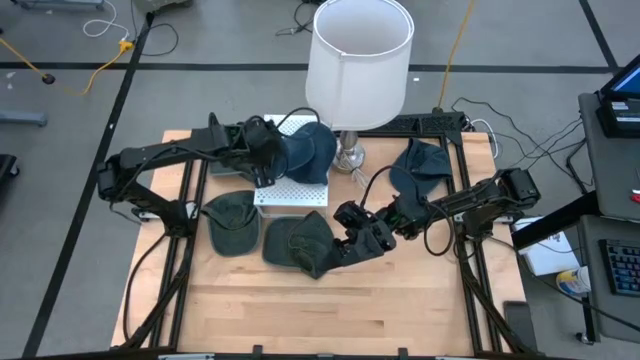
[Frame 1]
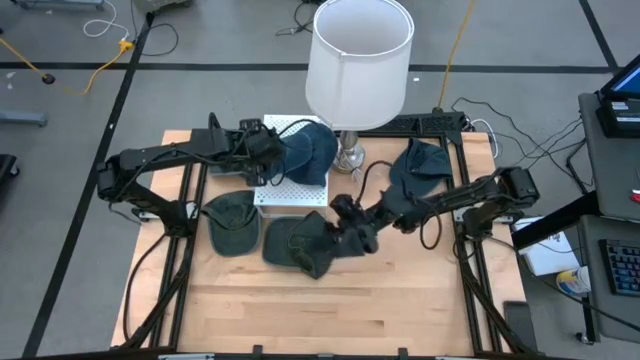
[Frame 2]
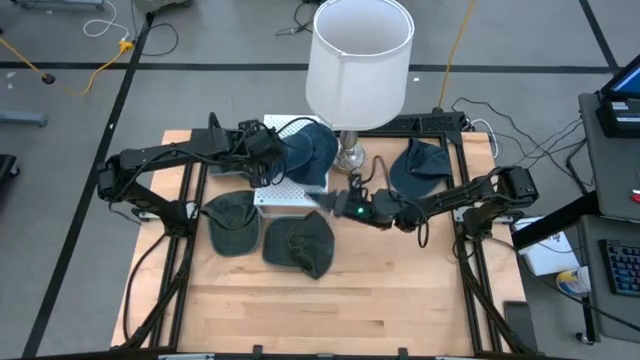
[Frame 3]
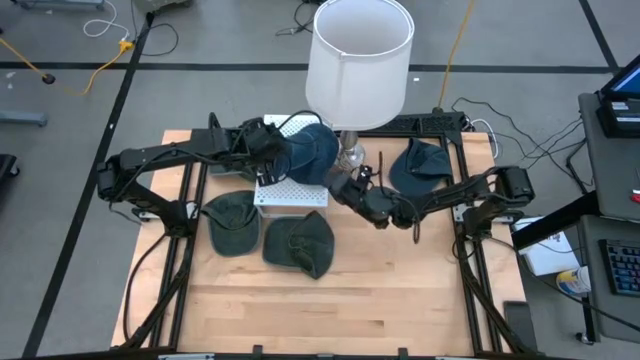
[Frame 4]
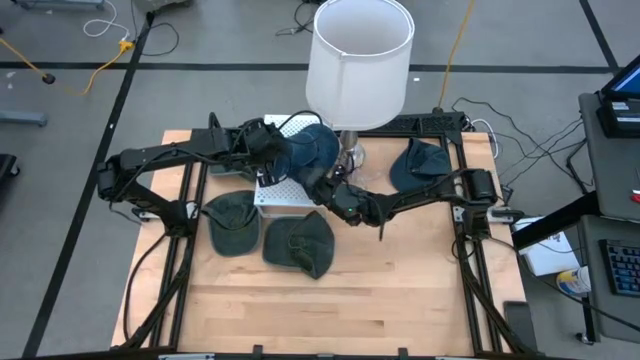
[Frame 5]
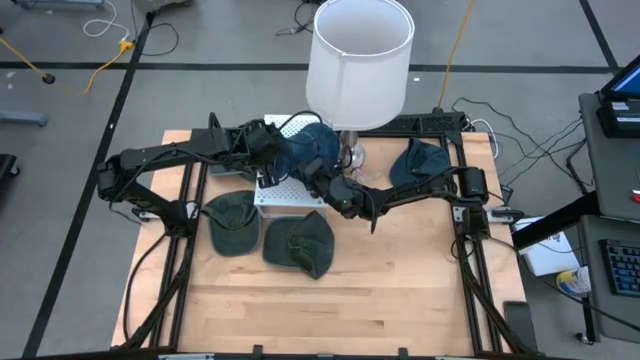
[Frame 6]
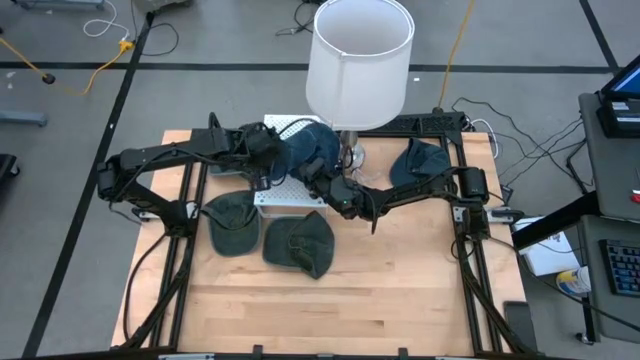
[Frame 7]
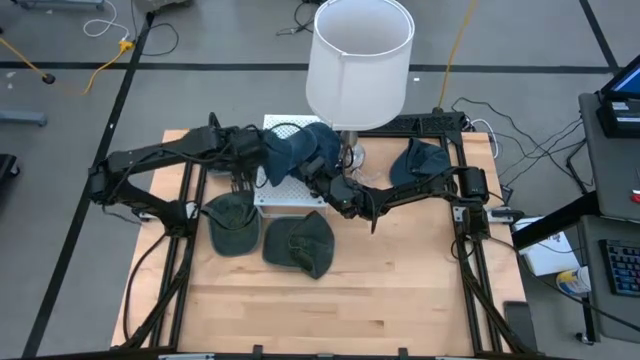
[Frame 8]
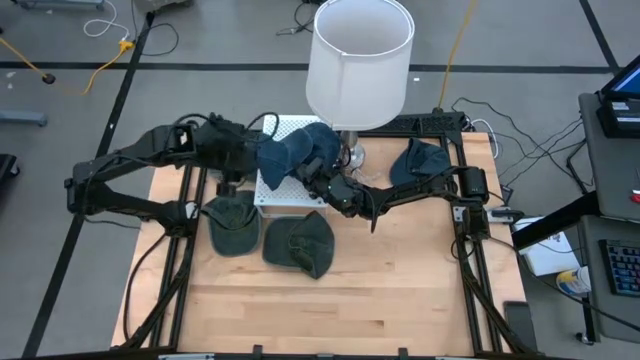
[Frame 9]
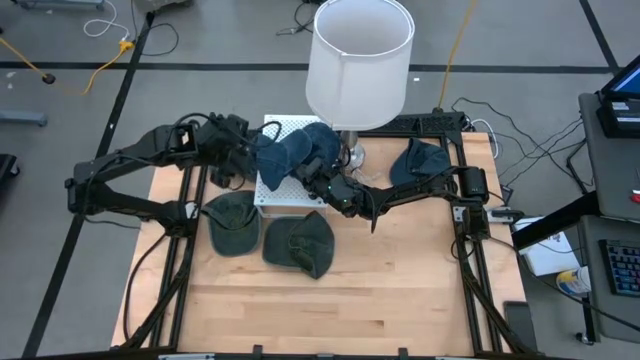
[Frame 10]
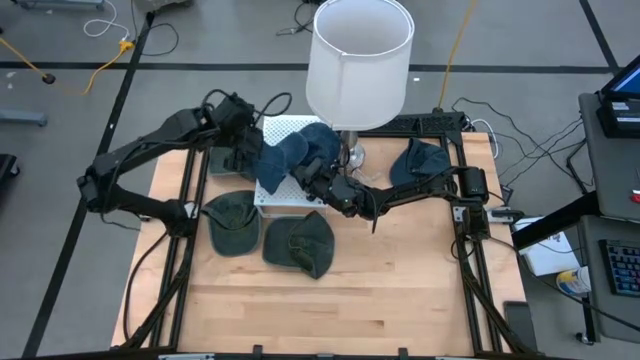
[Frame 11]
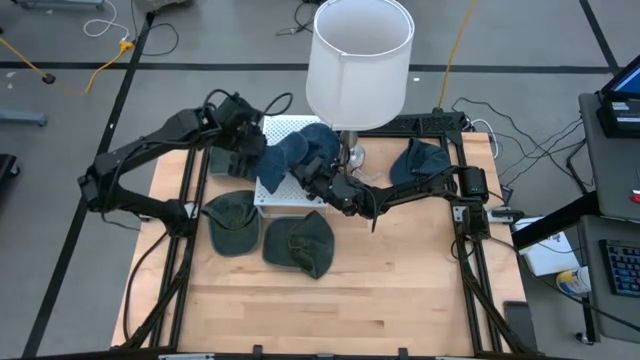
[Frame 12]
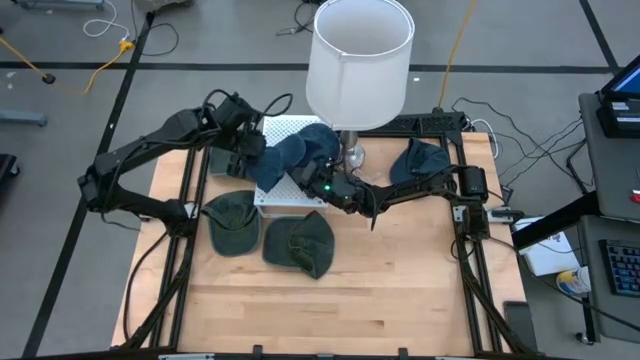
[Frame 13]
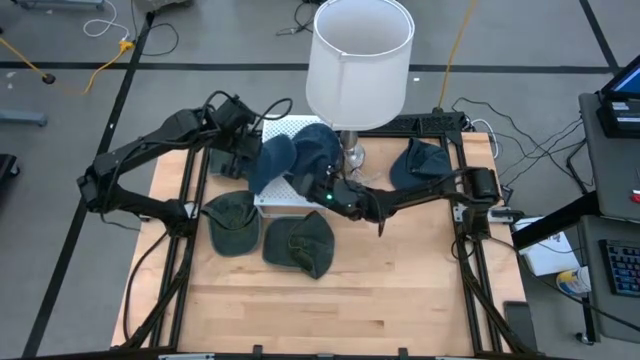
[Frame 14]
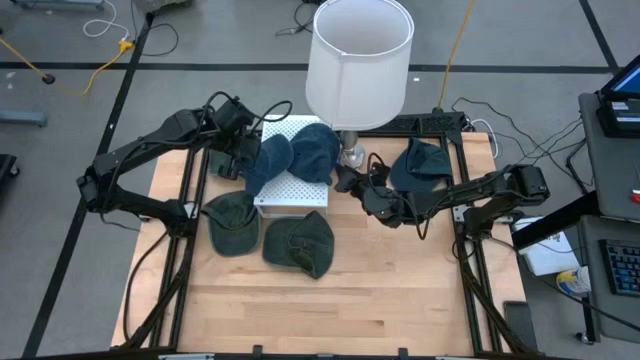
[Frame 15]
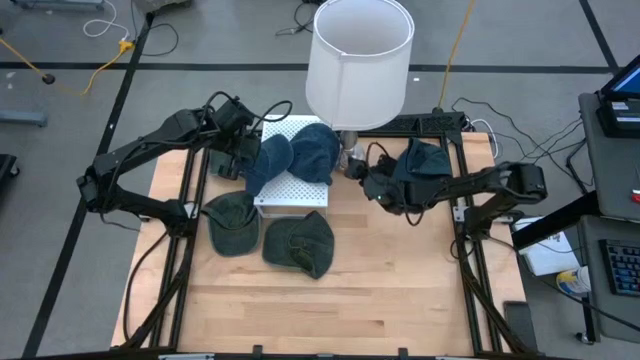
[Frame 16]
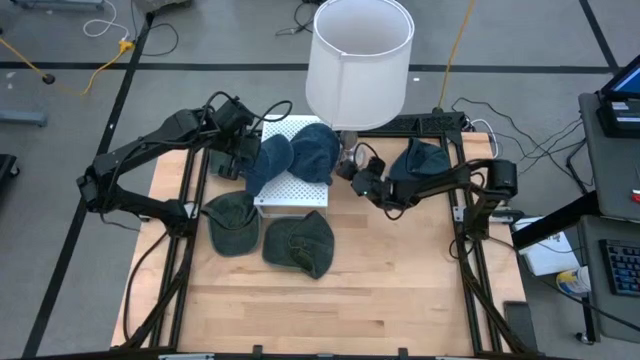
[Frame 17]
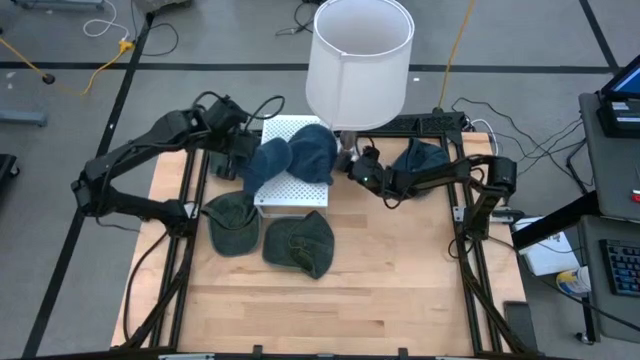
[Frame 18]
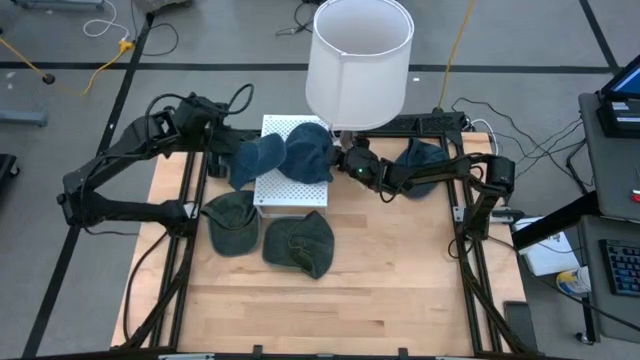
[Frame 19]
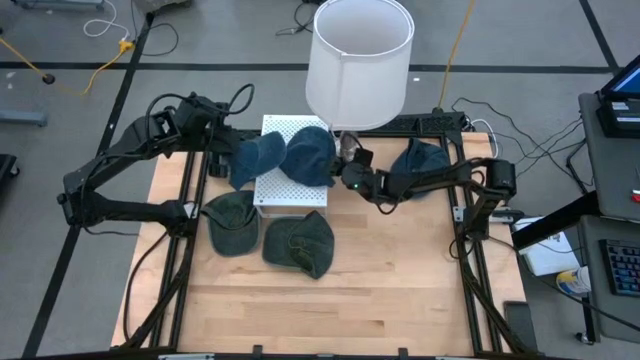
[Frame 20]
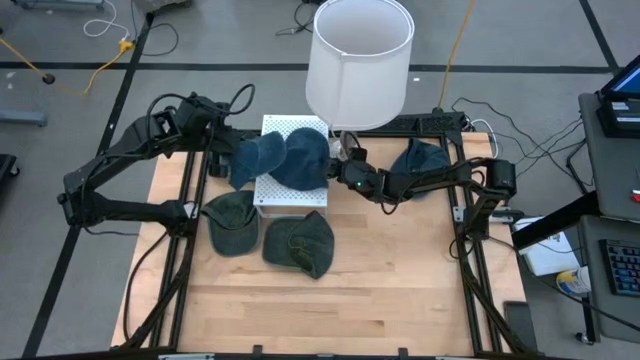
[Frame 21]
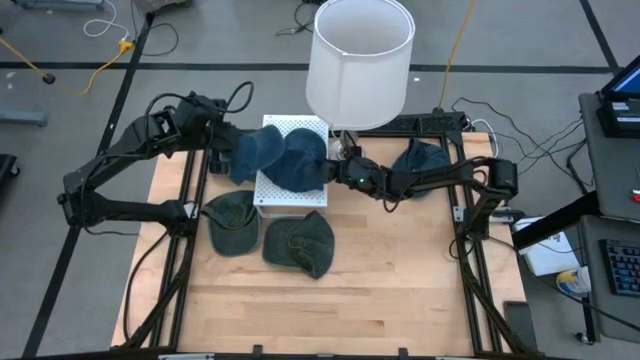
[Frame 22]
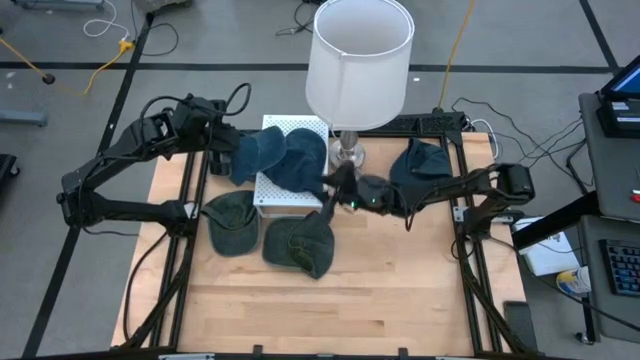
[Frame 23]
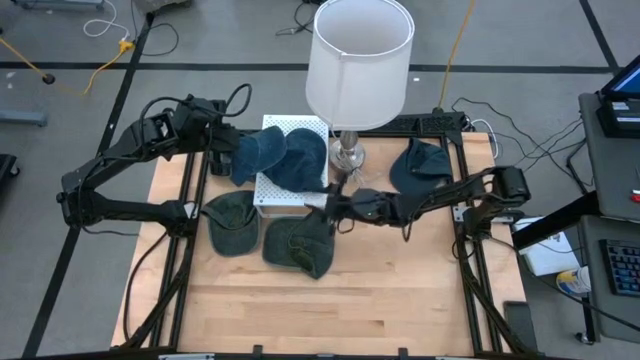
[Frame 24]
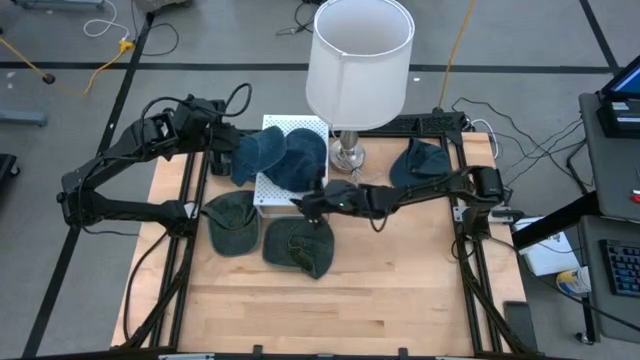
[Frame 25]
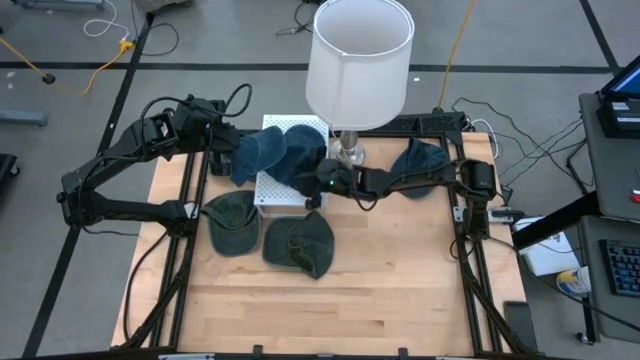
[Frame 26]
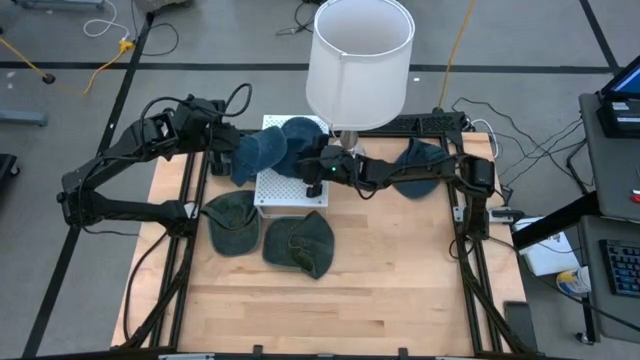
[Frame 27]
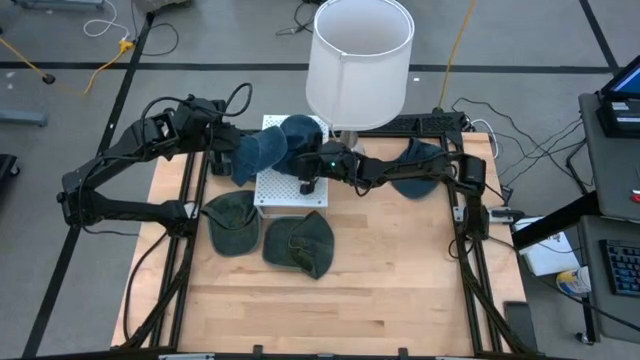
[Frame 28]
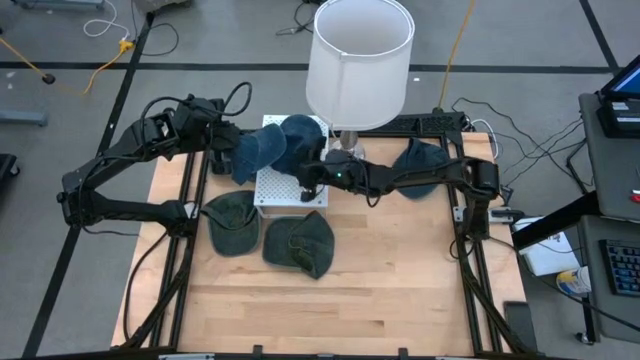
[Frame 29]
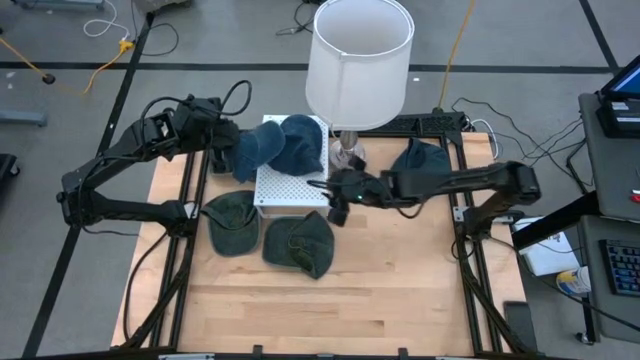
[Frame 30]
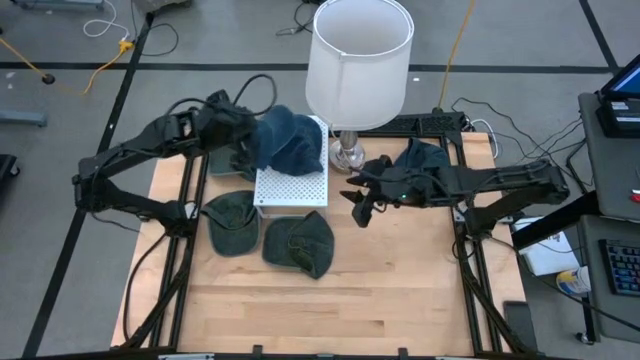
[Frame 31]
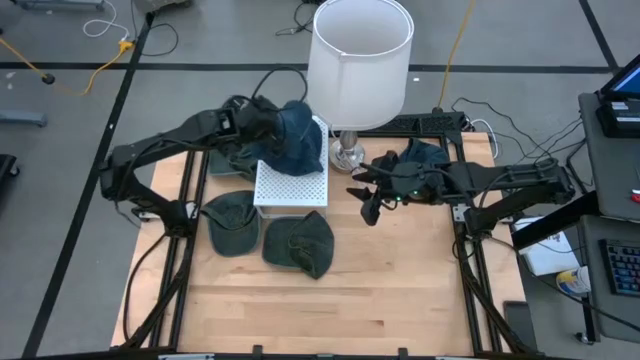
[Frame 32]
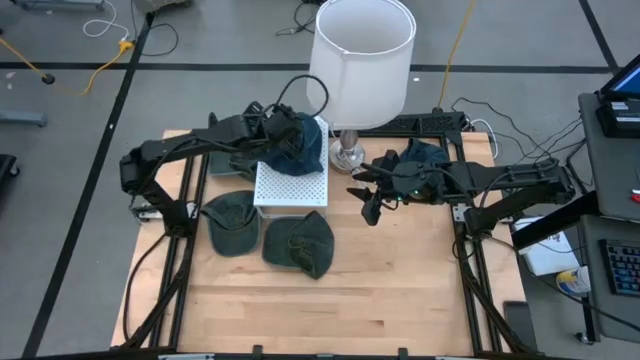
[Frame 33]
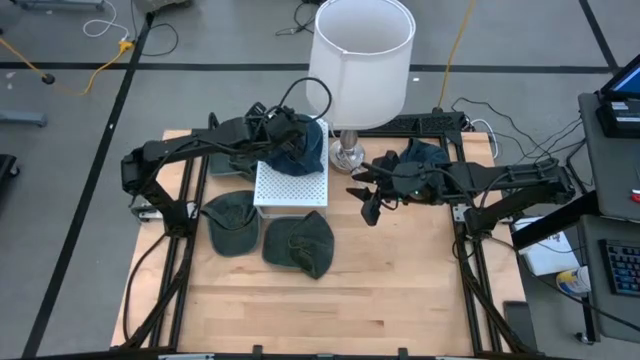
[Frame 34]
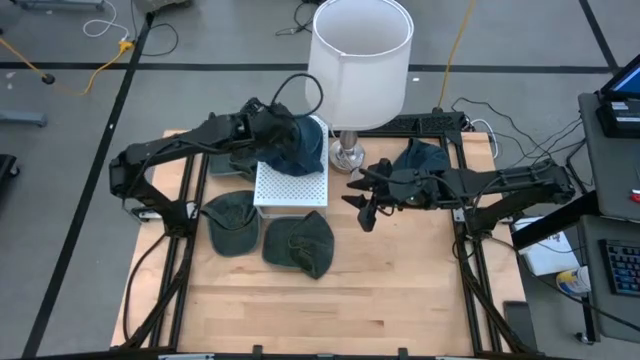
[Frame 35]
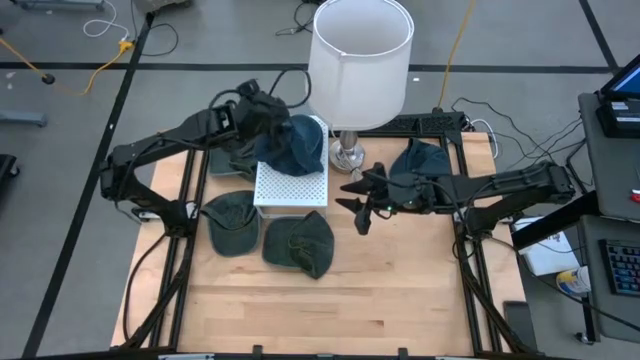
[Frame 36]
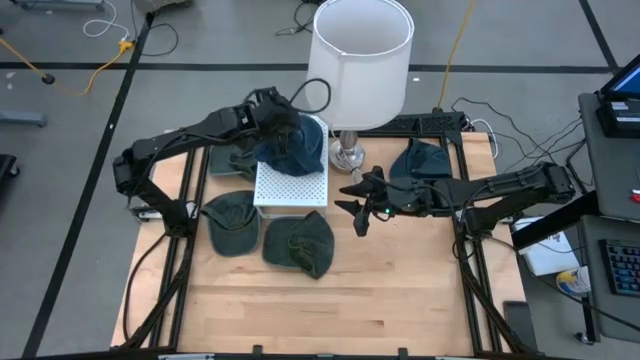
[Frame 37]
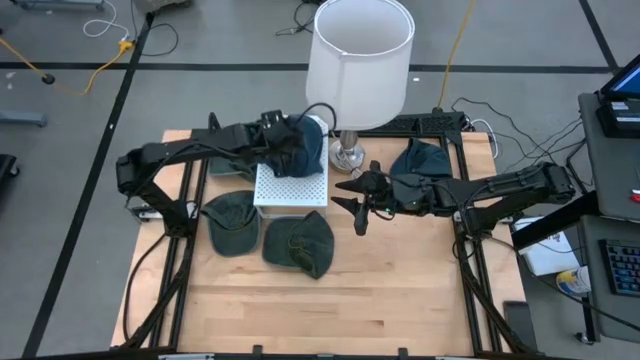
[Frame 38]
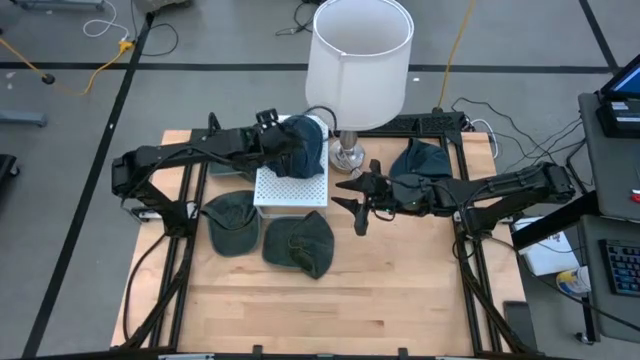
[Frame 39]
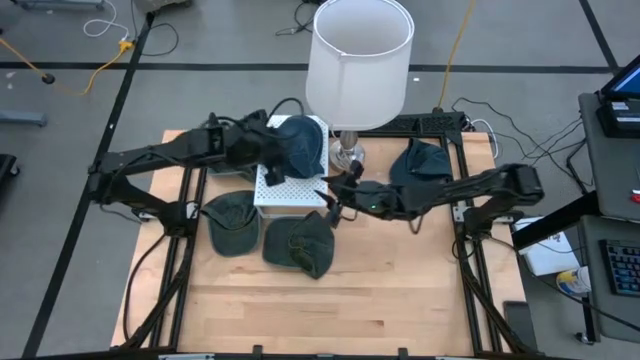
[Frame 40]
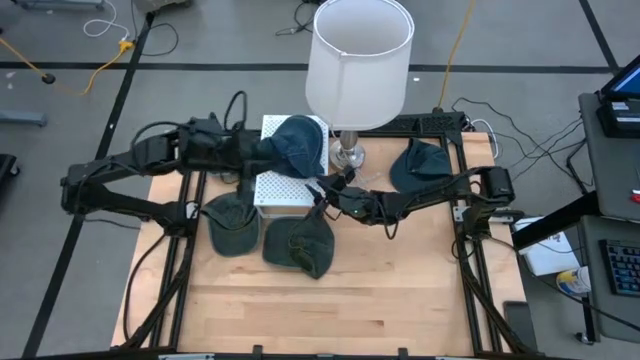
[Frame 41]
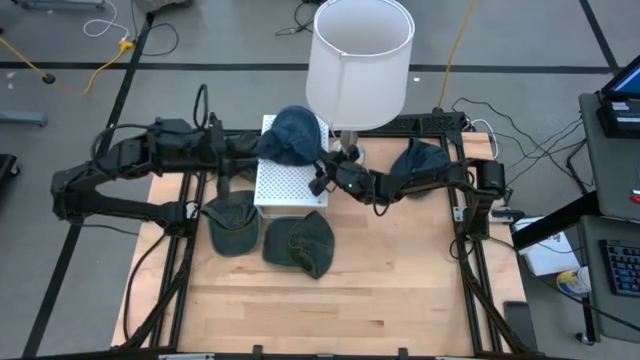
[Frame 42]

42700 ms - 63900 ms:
Task: Pick & Place hat
Stack the bottom blue cap on the blue cap on the shelf
